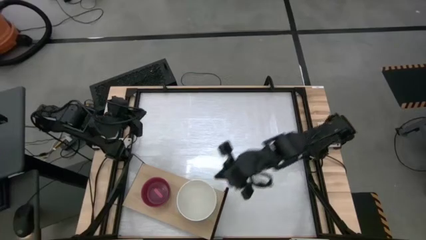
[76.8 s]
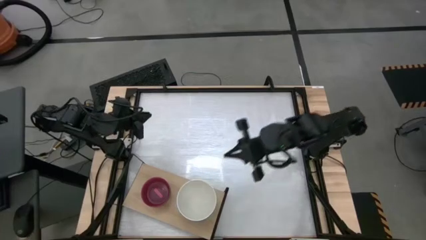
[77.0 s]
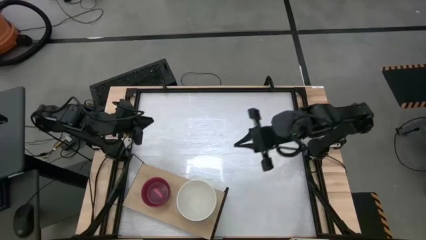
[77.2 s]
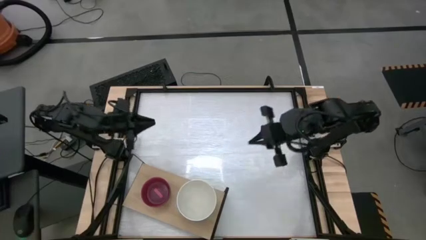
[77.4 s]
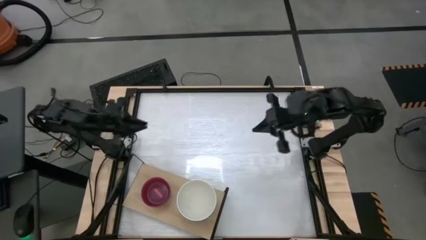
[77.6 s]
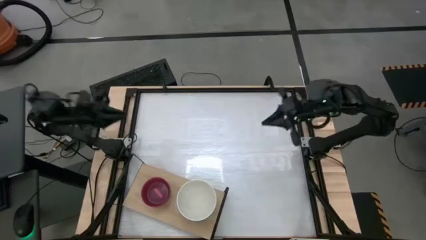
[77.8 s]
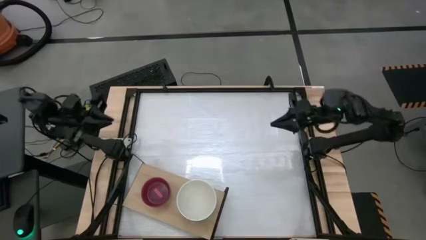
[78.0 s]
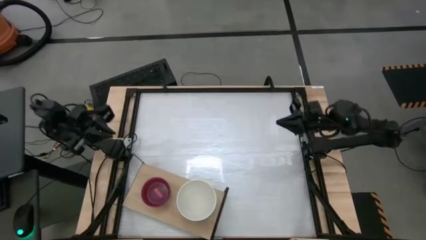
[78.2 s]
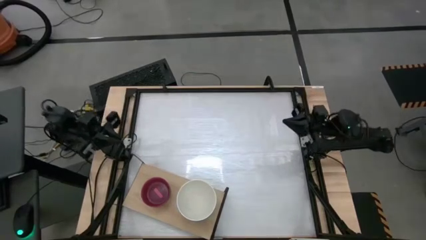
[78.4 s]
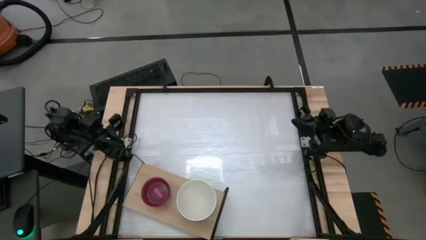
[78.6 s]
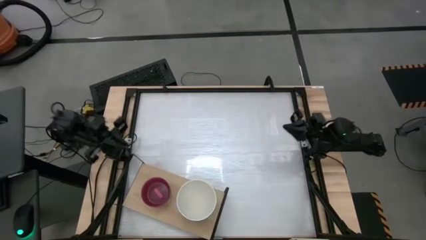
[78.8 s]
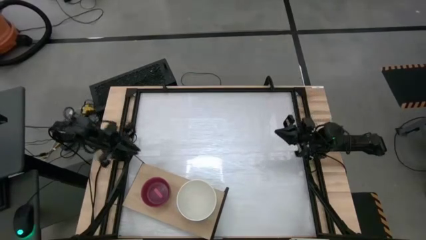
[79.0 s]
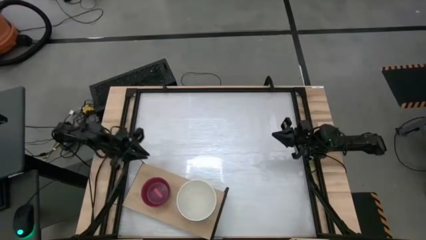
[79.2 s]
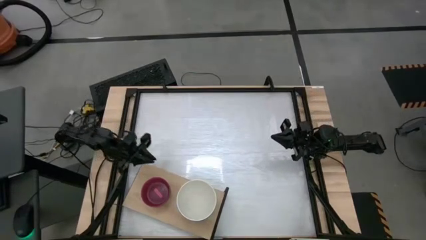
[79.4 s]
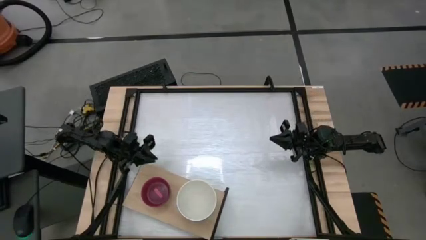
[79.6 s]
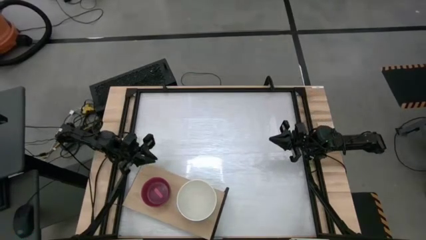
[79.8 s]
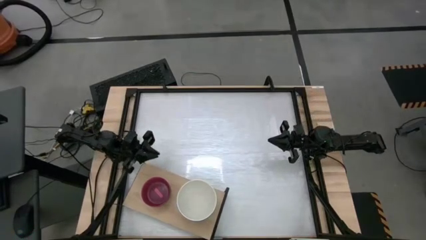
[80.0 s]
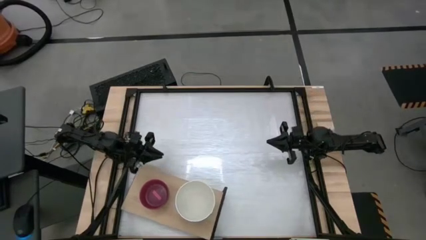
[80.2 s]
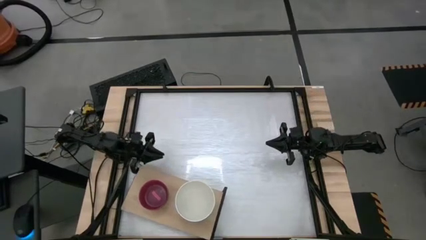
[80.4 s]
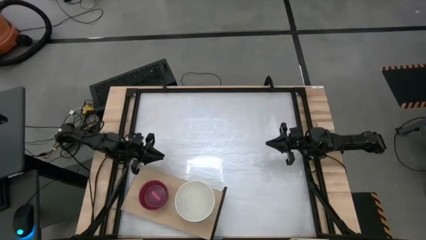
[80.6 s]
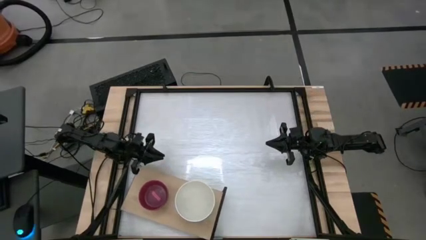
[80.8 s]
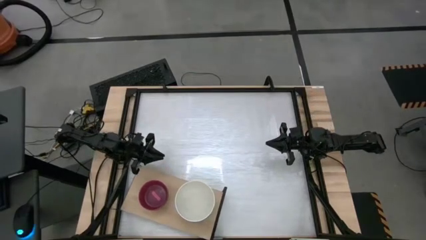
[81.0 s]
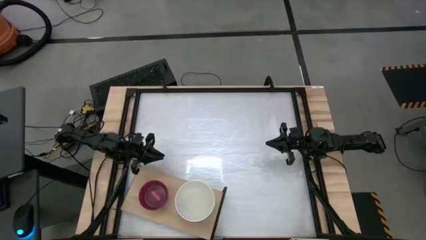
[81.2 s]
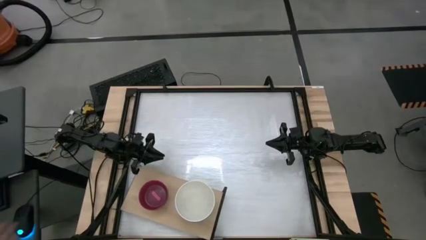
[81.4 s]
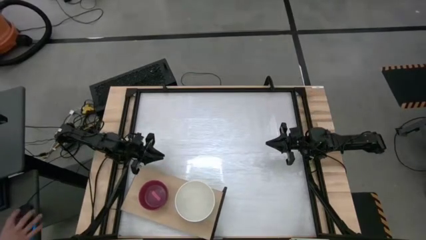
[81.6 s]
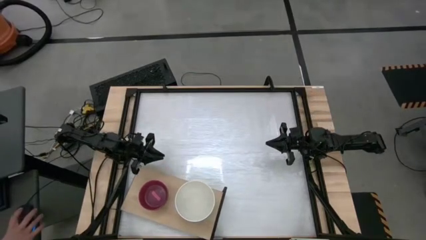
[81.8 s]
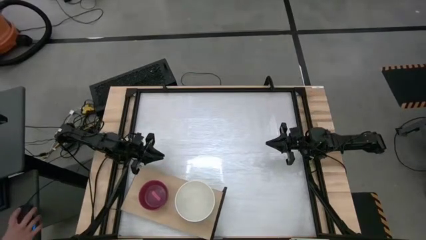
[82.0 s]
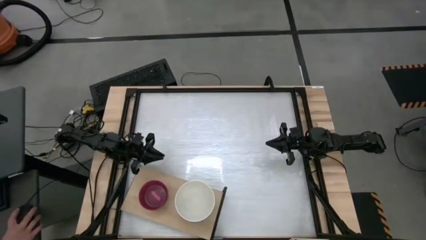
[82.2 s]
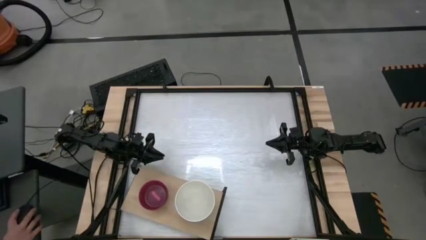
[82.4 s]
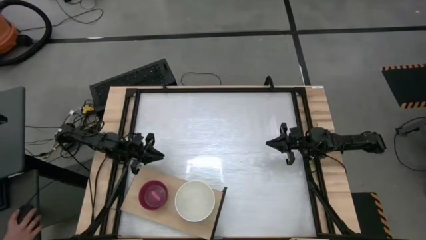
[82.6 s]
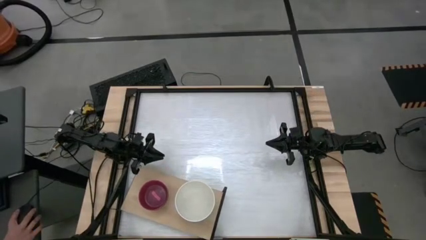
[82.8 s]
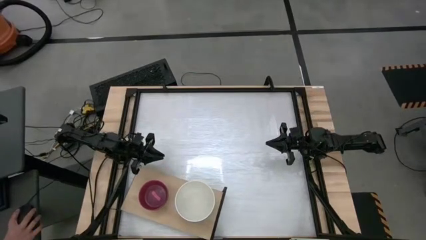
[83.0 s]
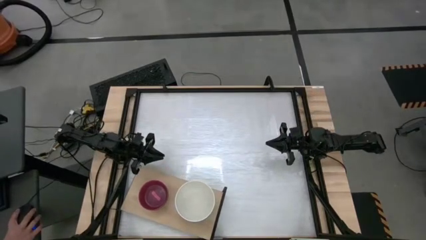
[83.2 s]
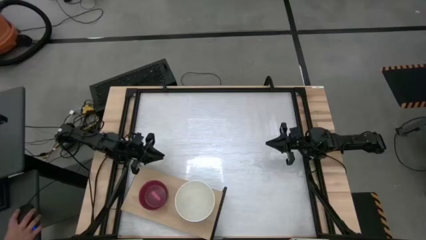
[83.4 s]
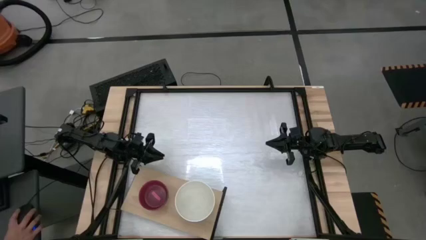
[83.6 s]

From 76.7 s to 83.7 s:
Task: Place and stack bowls onto a shelf
Return to Home Position

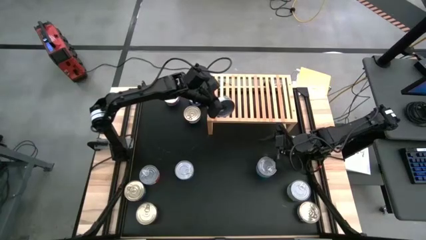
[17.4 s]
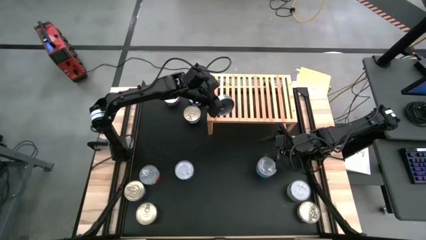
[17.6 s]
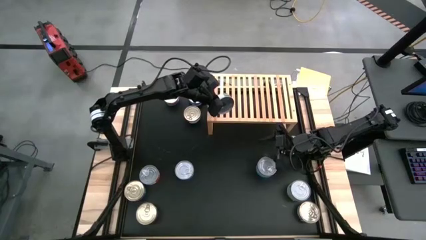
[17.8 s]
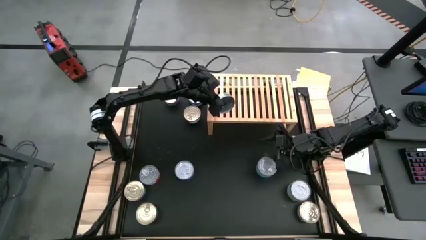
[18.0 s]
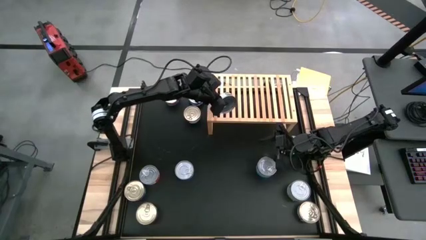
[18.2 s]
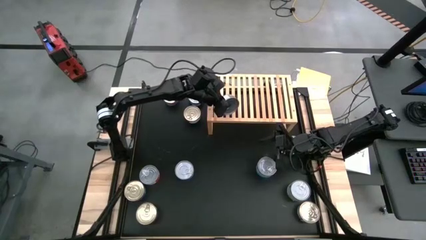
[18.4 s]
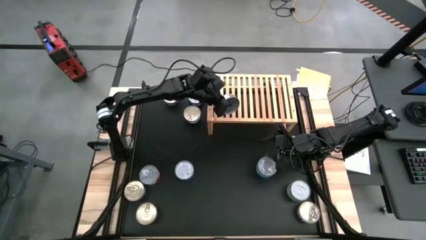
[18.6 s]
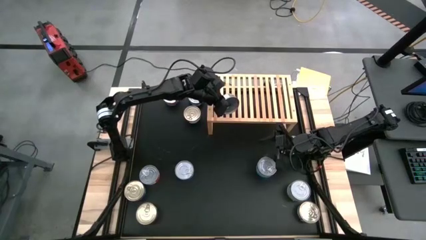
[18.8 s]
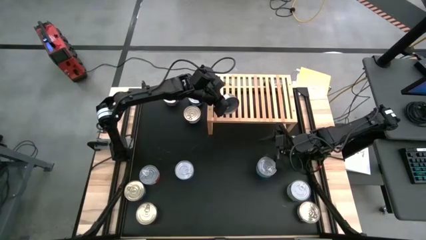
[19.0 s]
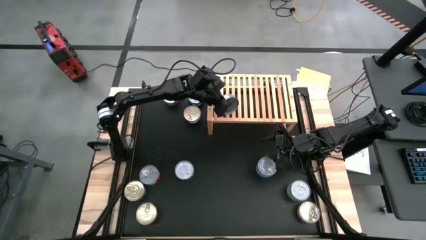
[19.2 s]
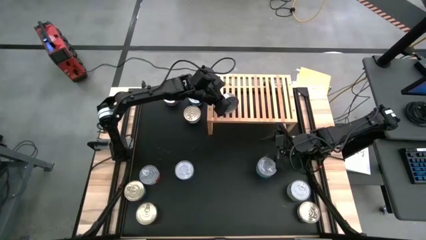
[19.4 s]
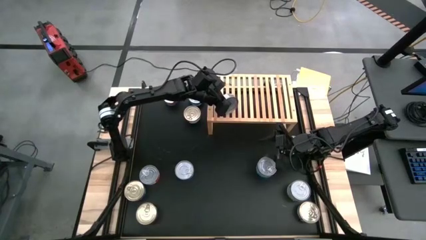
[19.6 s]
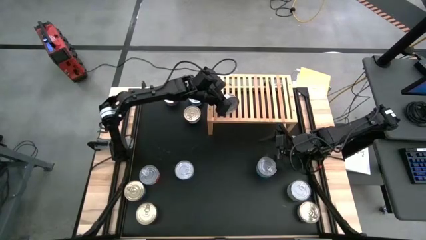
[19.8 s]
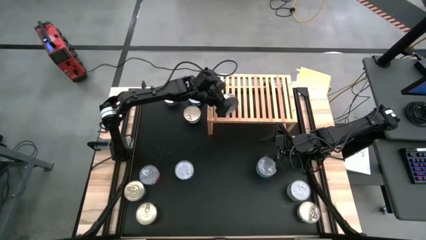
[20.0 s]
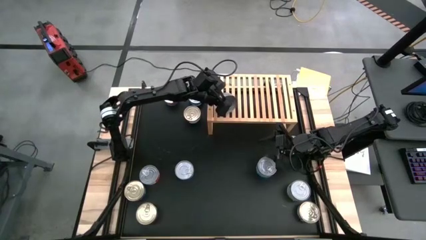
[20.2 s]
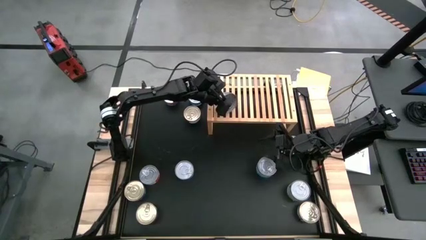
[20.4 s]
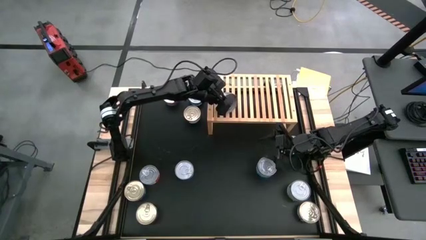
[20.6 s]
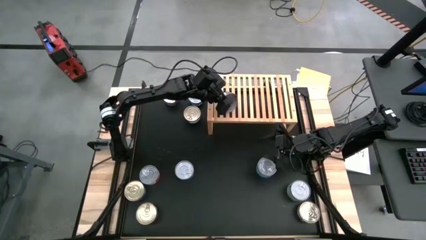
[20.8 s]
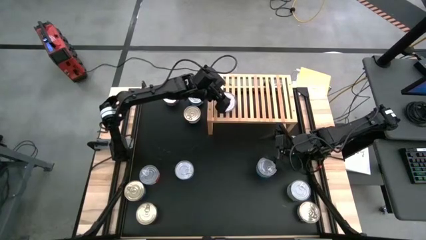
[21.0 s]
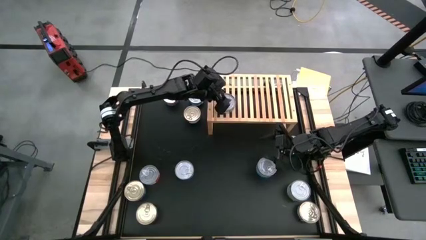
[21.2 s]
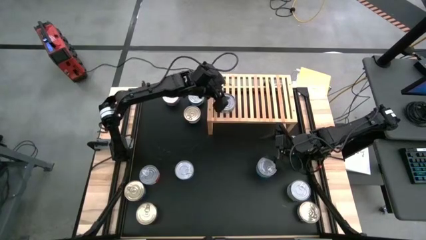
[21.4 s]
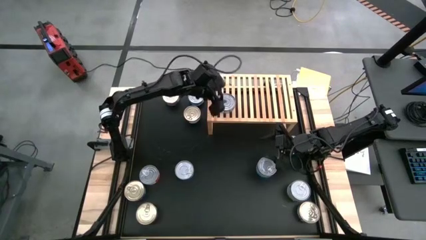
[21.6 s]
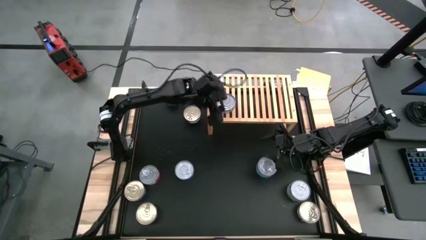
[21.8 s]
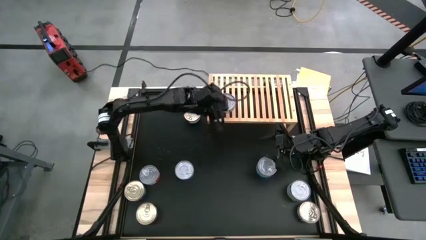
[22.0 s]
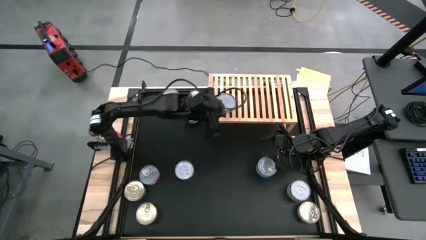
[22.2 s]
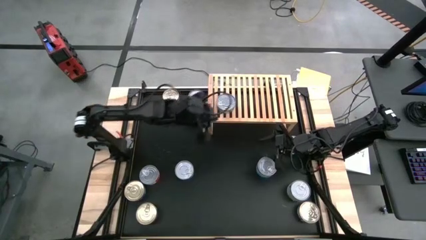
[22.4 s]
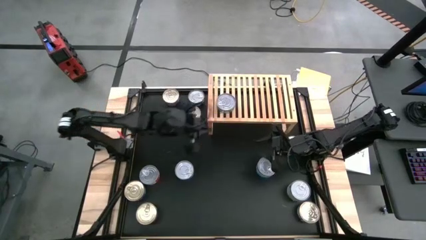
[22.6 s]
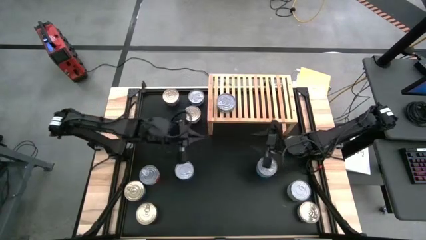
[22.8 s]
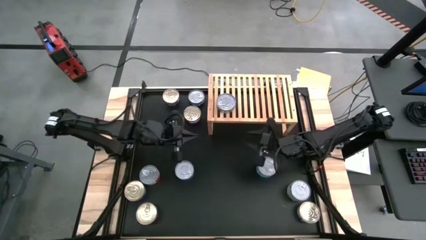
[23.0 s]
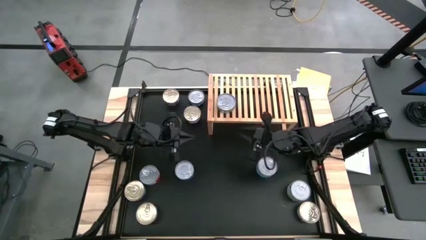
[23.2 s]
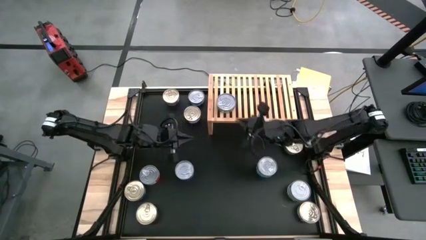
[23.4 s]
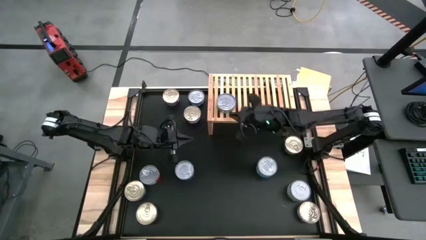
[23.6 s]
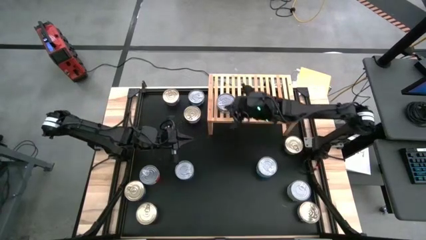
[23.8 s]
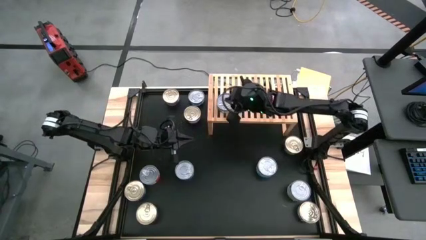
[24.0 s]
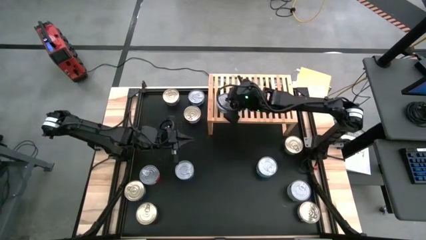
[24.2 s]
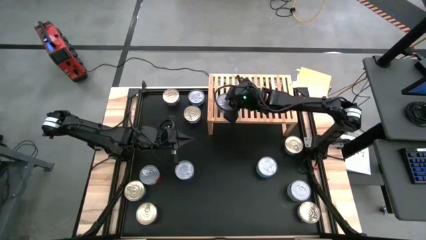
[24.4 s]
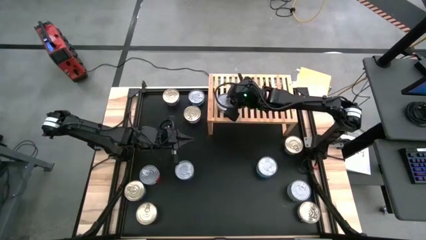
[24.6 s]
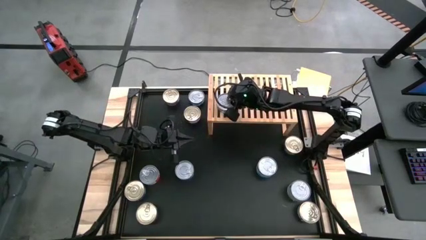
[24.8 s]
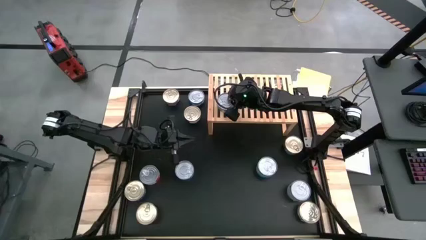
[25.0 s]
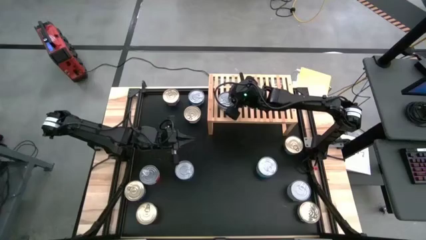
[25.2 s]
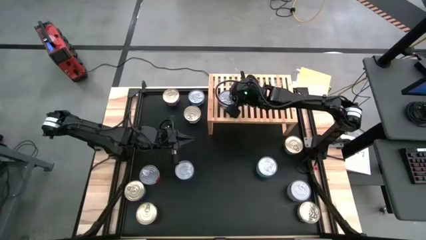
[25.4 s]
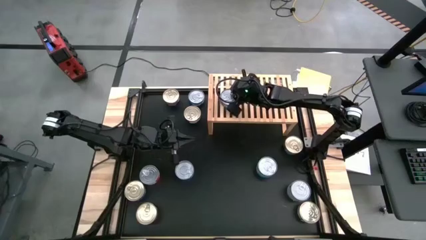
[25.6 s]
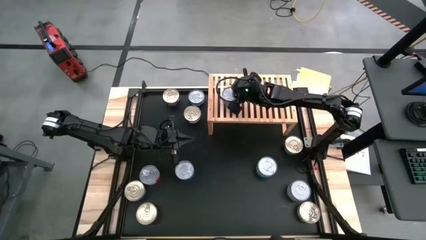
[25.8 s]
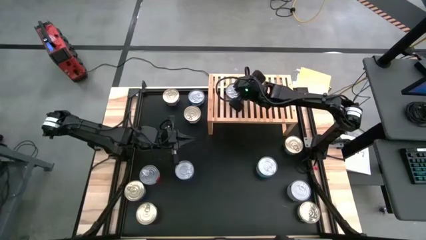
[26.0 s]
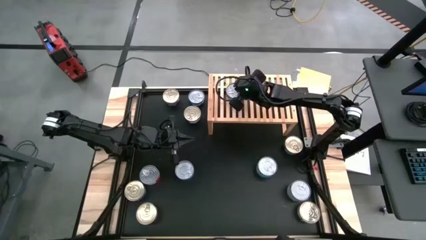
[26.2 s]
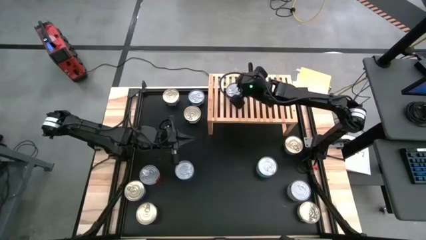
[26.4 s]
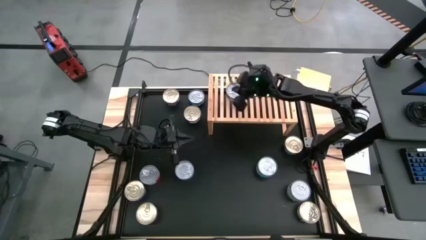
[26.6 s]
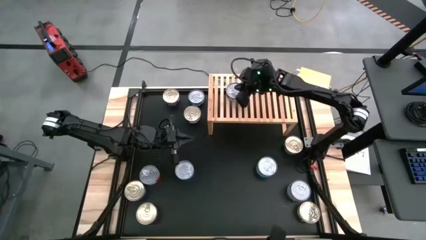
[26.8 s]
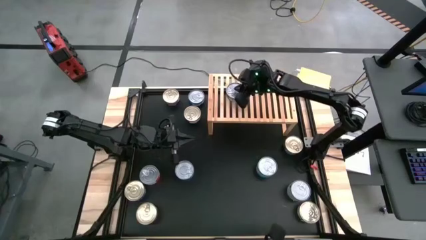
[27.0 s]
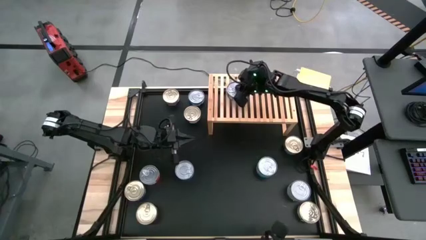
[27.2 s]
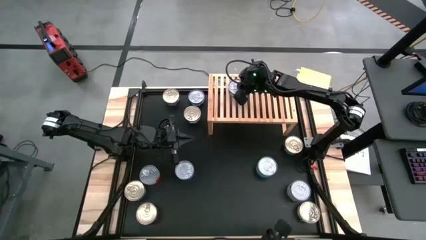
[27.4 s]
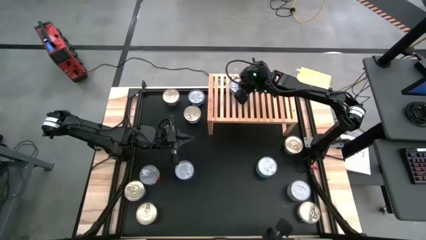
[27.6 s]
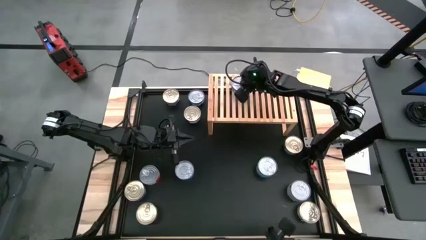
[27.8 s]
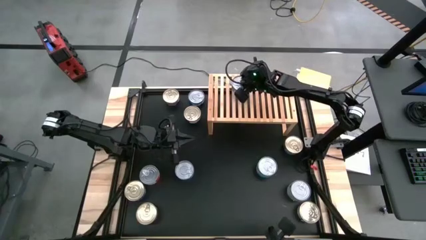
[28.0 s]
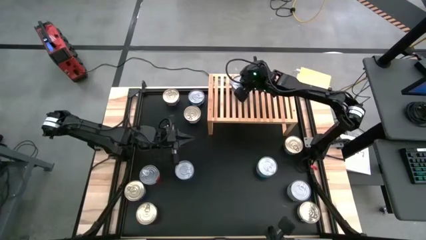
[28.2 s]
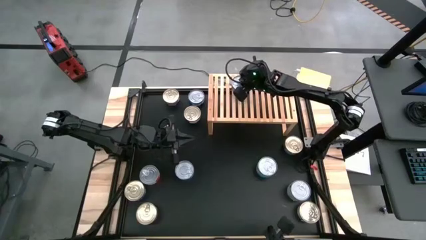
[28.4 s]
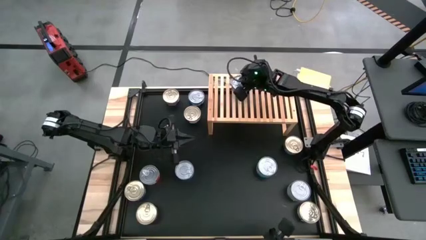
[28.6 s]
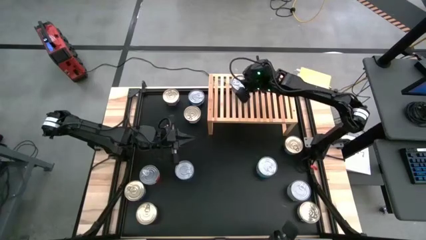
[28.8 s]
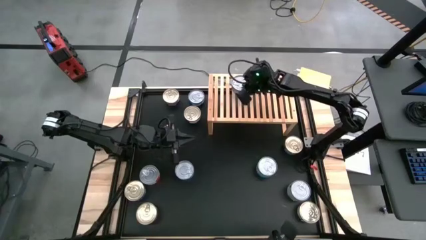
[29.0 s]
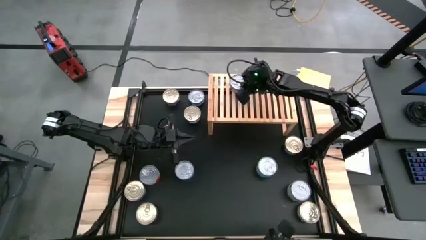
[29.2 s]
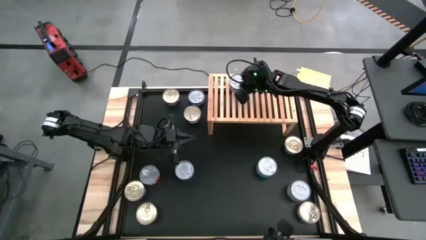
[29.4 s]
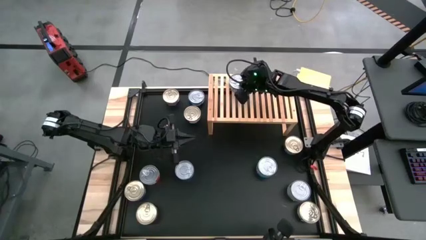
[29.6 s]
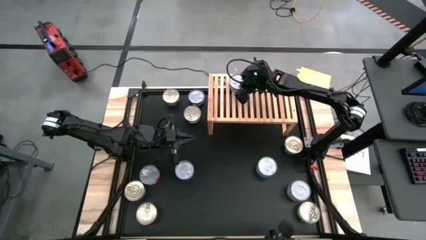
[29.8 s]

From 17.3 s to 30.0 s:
Task: Stack canned seafood by type on shelf
Put the green tuna can on the shelf
